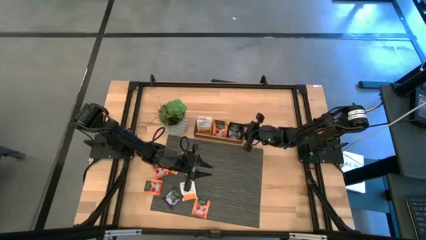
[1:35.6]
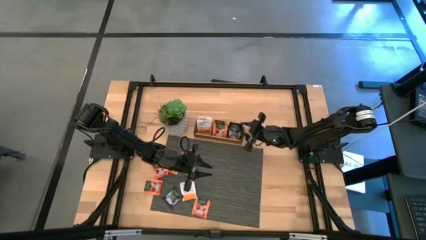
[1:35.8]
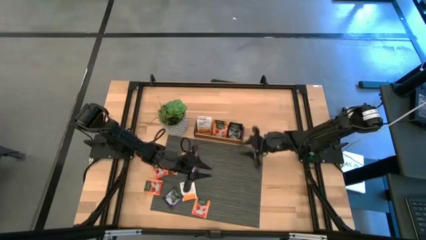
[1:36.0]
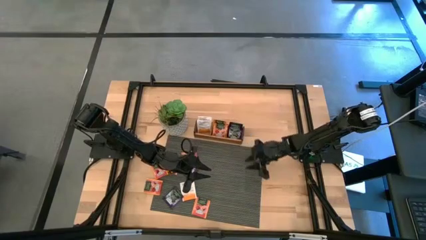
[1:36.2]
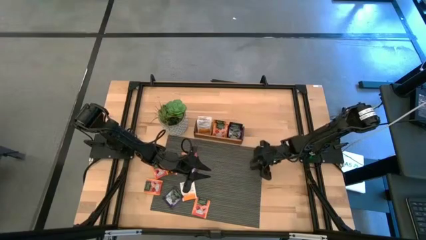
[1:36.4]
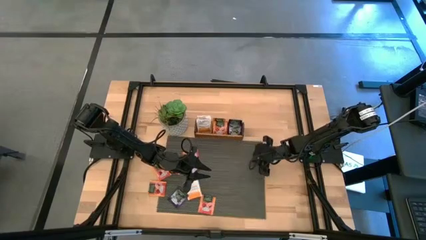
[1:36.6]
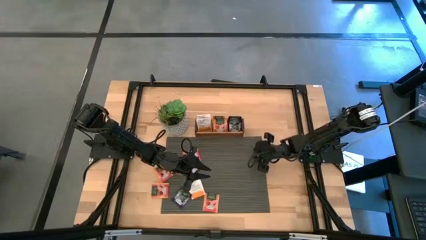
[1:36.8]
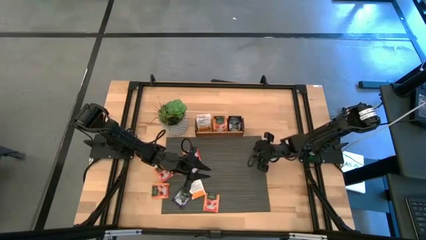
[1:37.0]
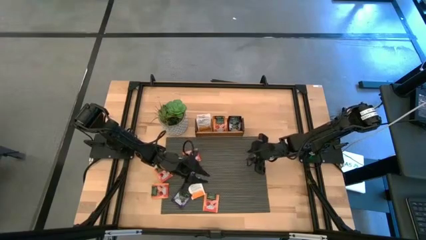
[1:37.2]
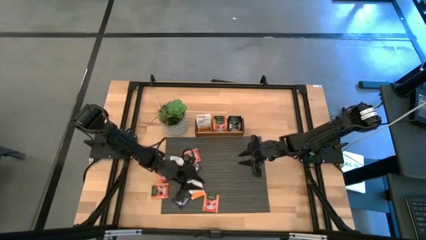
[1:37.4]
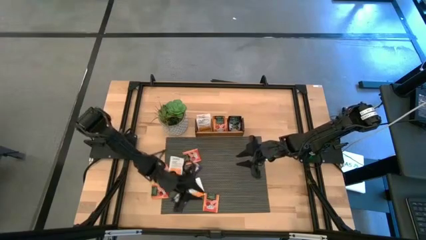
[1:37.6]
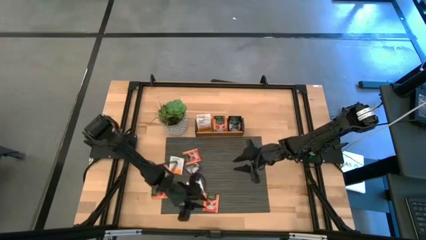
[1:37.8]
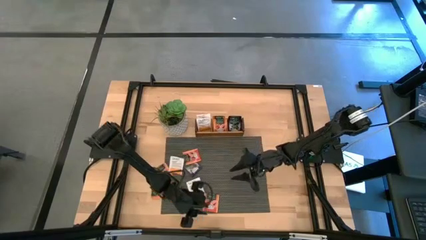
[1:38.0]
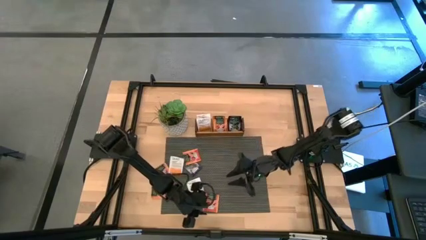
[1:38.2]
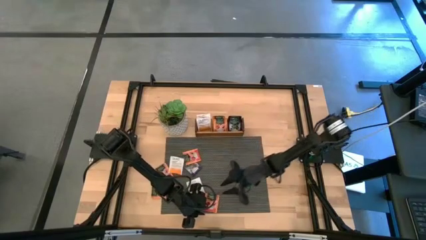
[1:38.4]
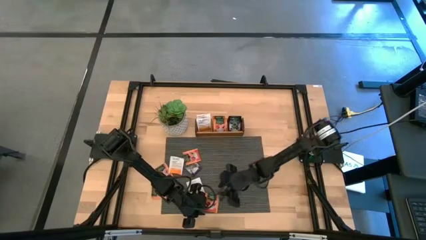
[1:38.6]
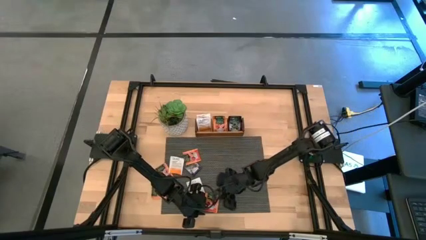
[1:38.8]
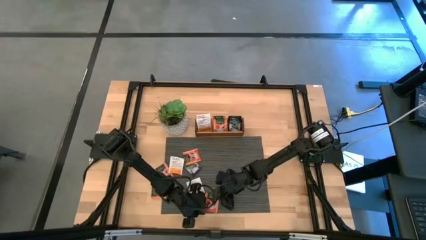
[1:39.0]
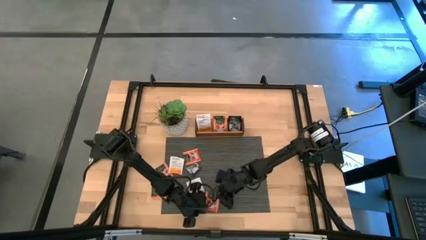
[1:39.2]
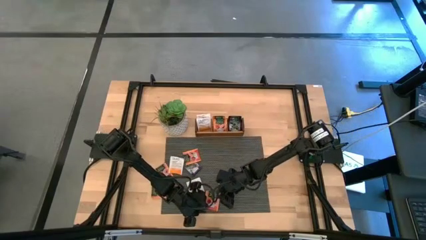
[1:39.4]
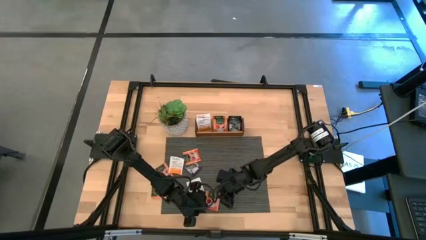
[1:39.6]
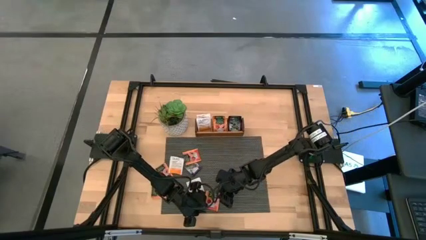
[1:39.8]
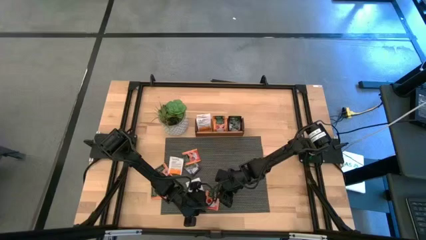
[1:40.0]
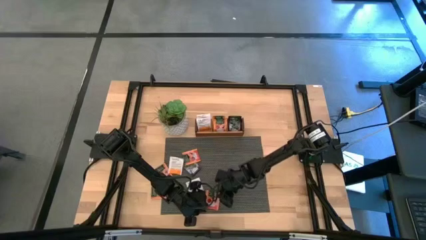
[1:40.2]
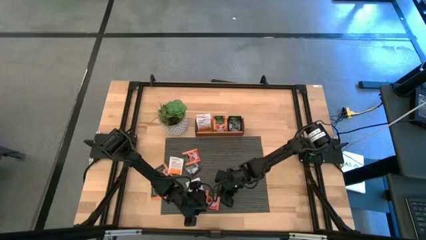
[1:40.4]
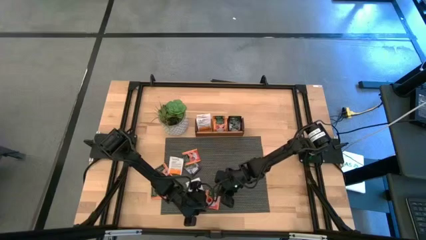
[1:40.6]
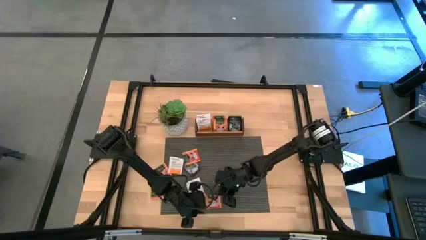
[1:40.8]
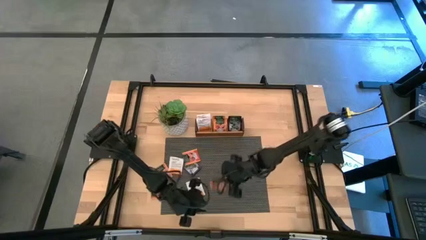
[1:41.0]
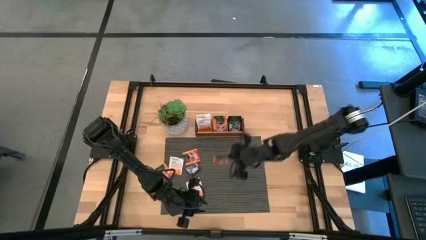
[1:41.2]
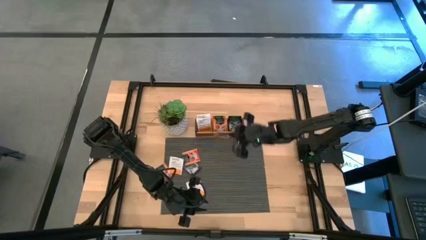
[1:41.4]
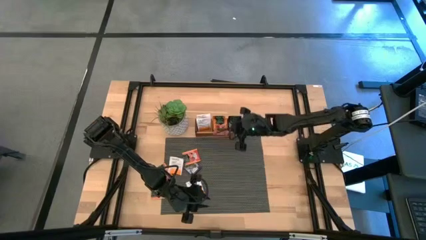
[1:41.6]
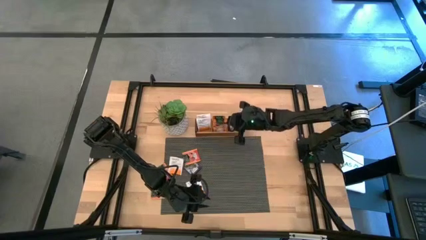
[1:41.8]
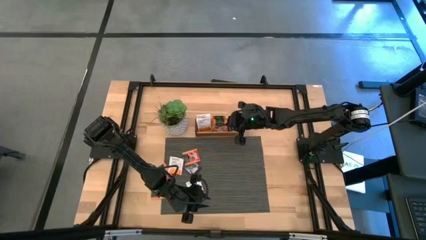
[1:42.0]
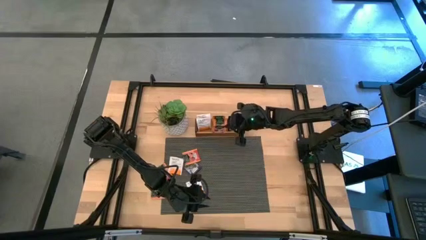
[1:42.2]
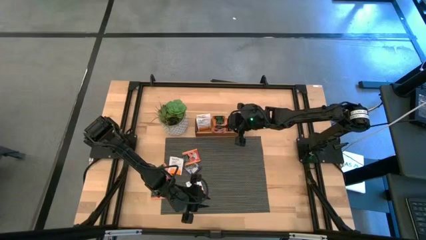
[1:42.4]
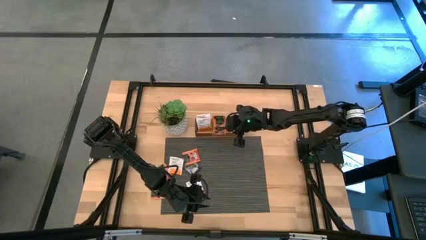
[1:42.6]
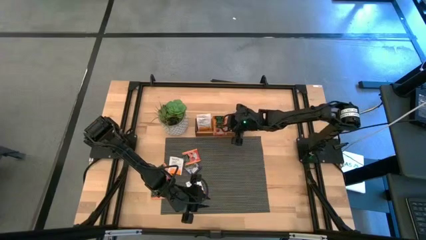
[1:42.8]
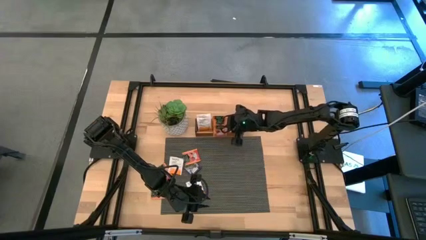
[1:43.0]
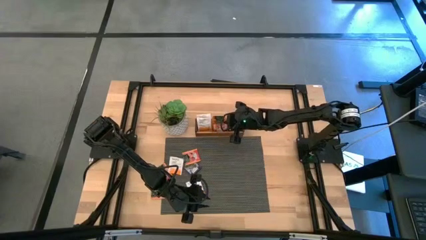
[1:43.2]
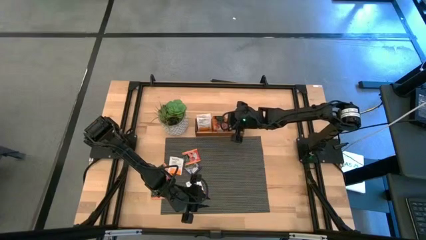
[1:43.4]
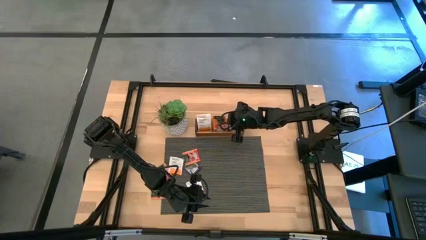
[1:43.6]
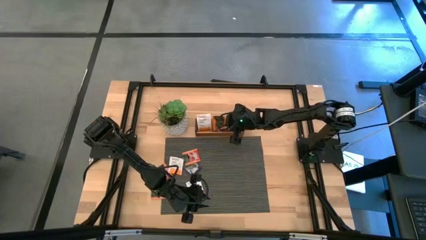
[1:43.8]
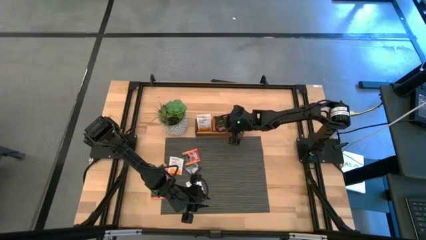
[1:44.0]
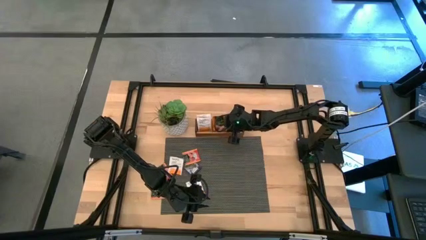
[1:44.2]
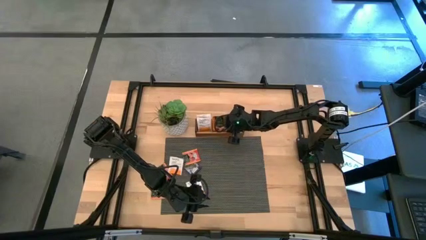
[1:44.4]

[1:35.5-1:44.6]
Task: Pick & Place Tea
Put the orange tea bag into the middle section of the wooden organizer

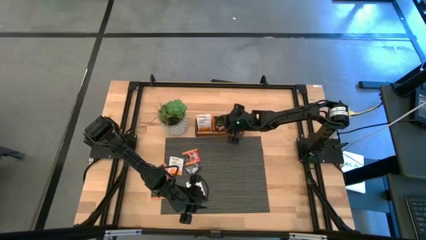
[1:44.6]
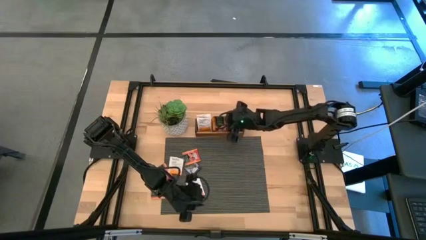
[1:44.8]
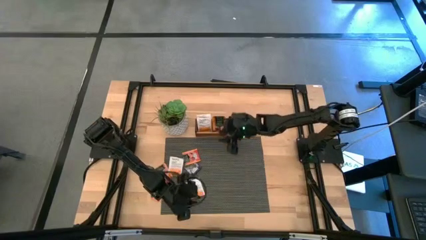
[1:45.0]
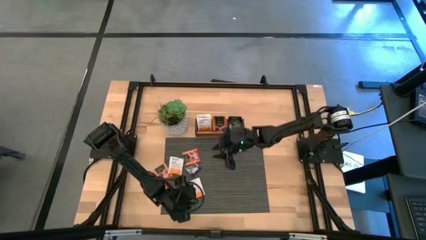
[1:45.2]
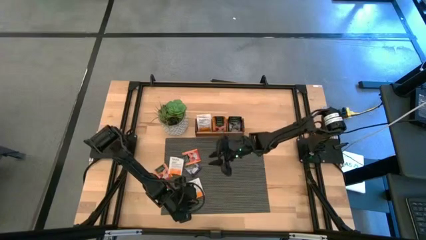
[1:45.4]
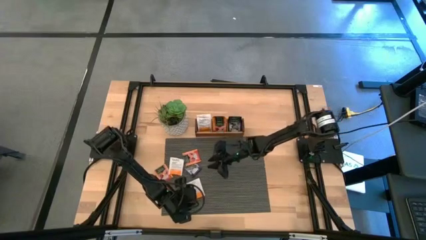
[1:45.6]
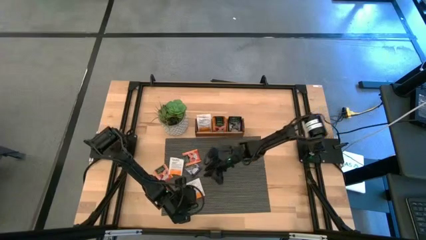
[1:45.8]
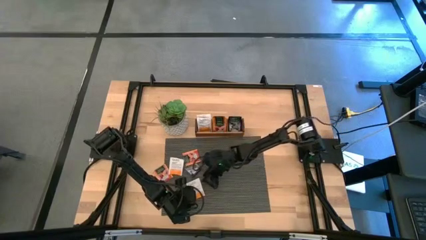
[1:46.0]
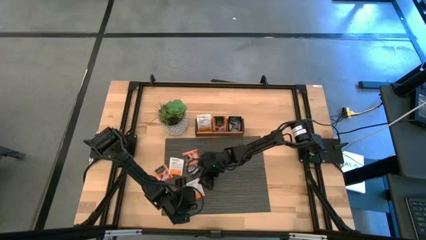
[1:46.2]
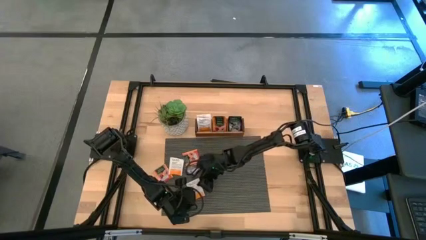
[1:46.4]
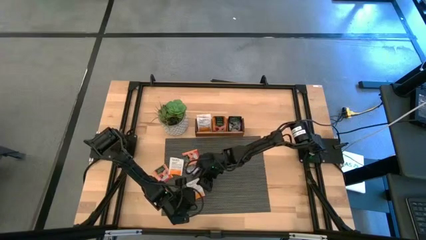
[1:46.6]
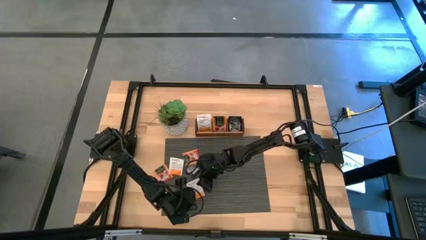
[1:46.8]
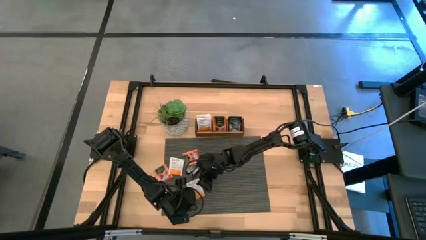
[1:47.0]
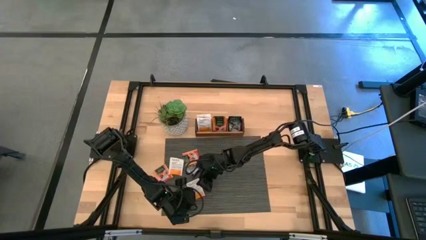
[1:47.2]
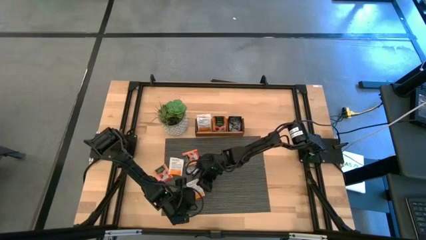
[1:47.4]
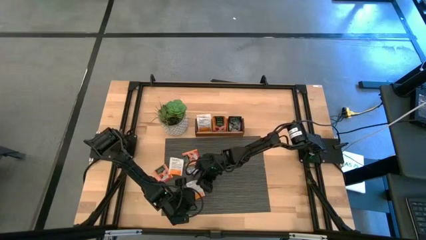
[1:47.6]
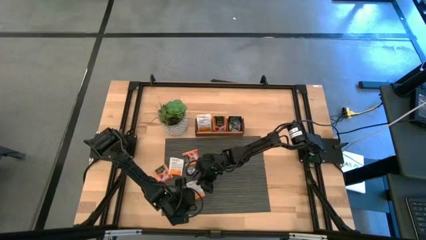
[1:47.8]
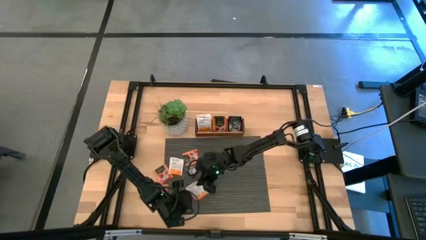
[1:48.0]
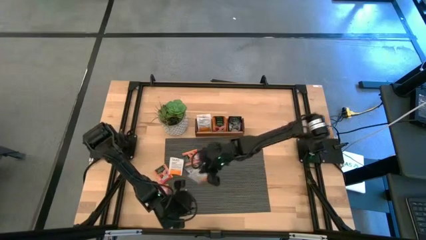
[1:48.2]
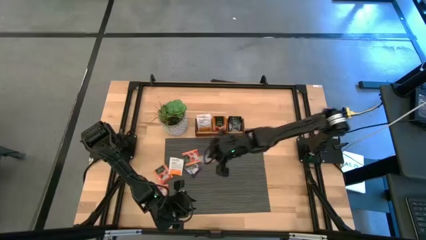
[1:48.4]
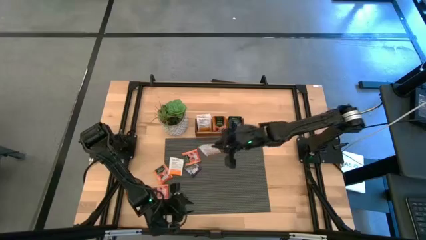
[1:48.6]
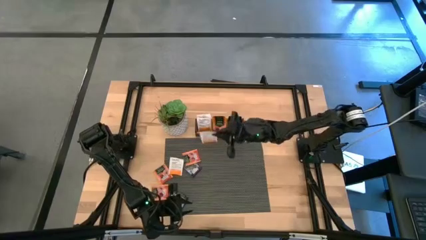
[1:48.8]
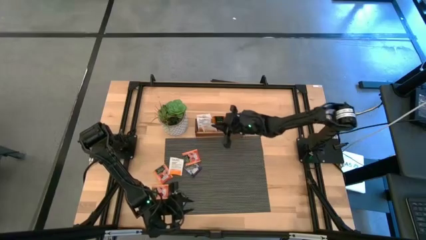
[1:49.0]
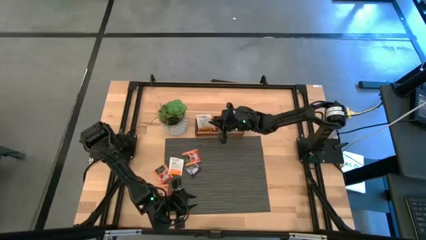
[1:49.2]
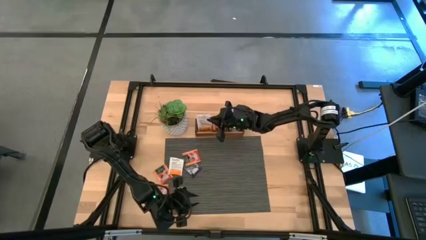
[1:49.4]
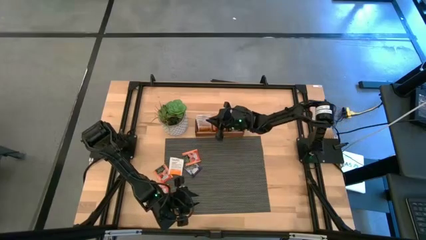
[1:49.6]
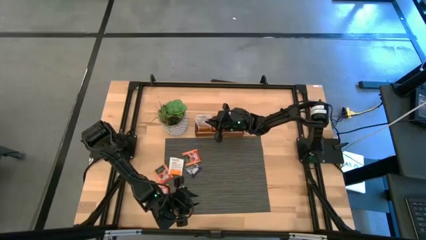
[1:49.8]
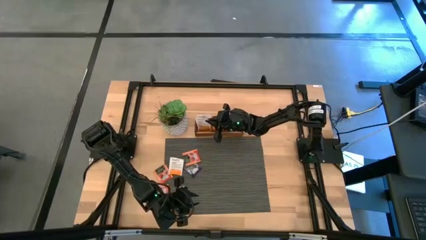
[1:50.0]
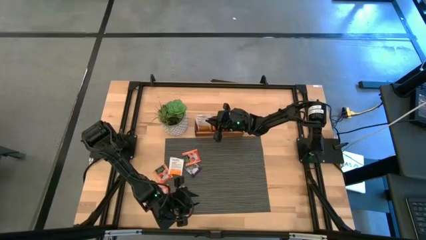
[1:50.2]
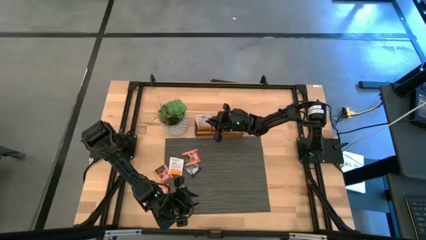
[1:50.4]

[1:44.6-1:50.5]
Put the white tea bag into the left section of the wooden organizer
